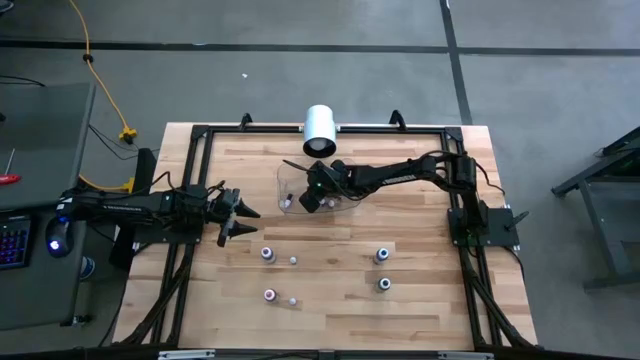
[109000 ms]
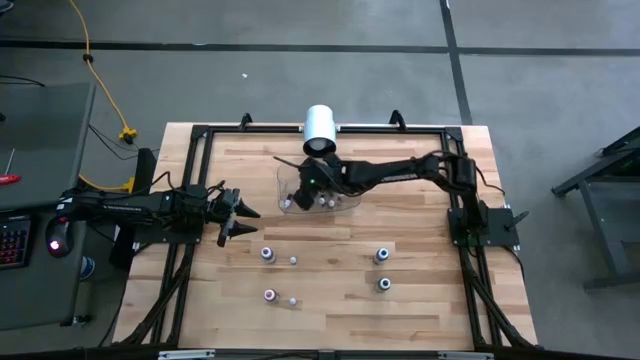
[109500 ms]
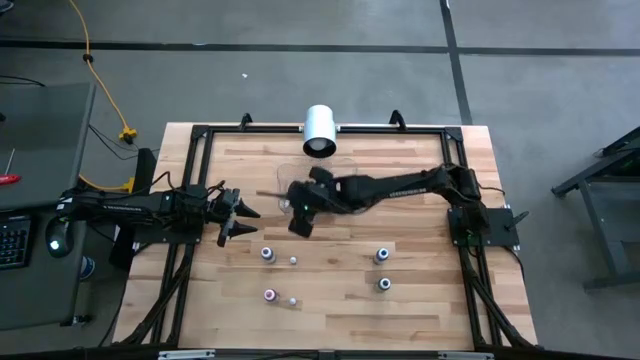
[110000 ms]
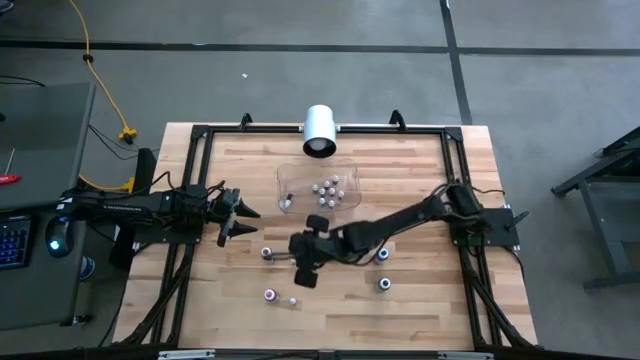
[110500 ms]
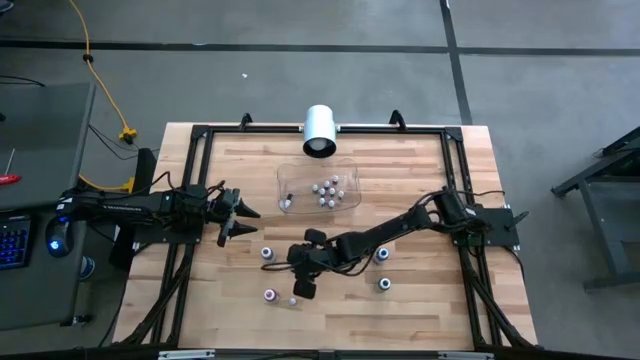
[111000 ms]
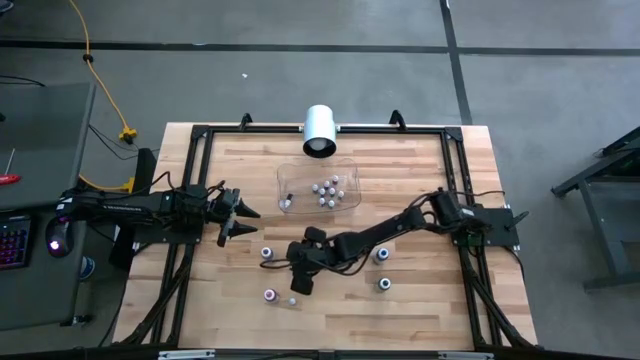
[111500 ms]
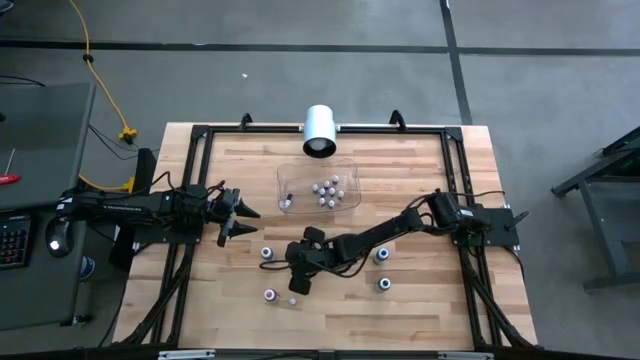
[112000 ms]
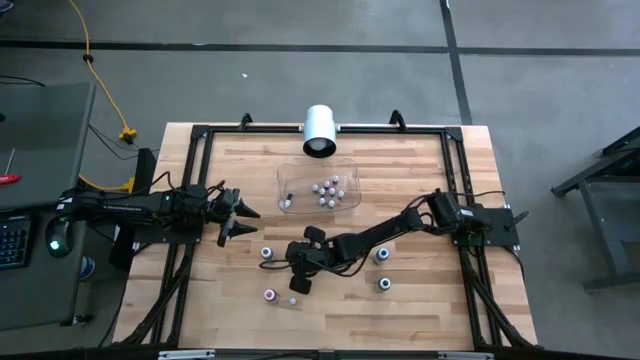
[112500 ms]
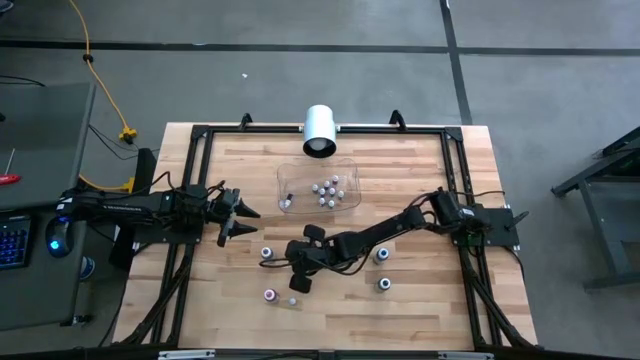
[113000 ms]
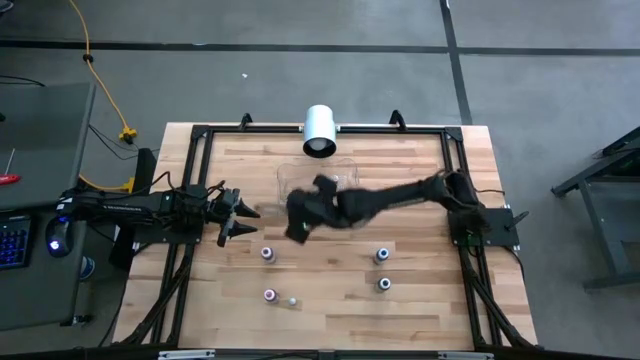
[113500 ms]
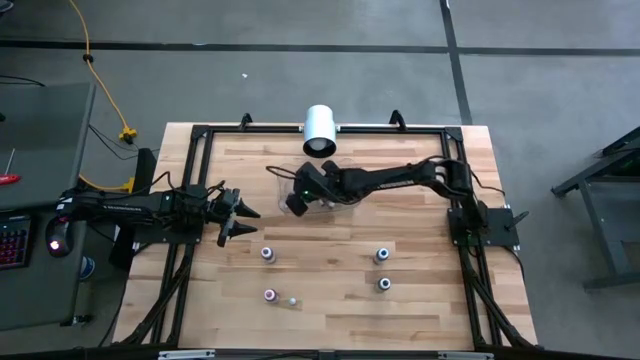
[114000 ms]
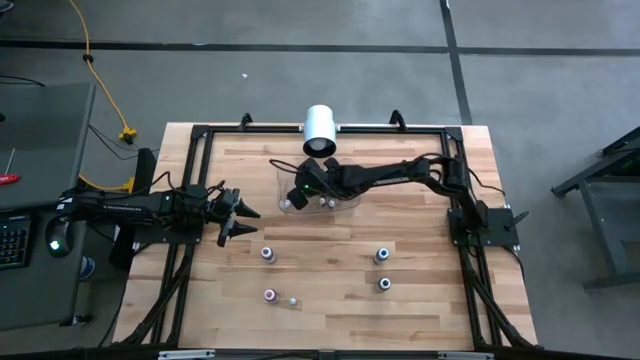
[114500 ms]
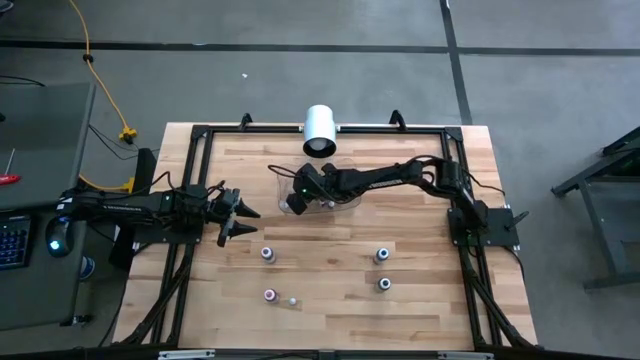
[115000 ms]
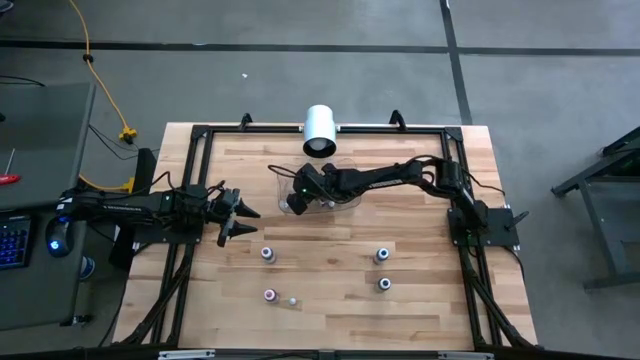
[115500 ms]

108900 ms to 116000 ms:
Task: Pick & Place food coloring
Put the small purple food coloring bottle into the transparent bin

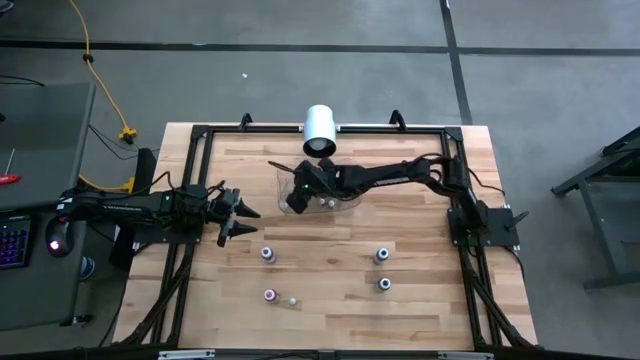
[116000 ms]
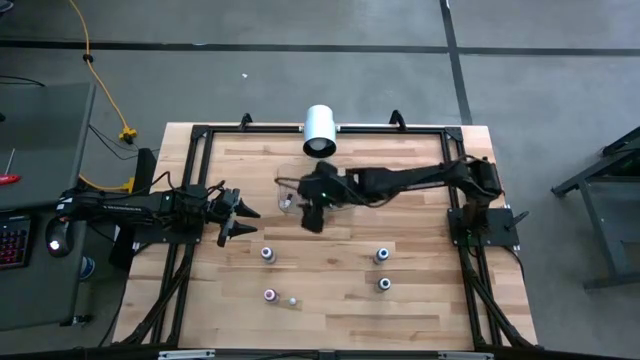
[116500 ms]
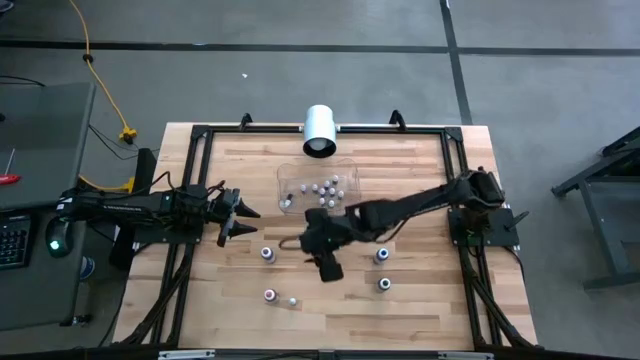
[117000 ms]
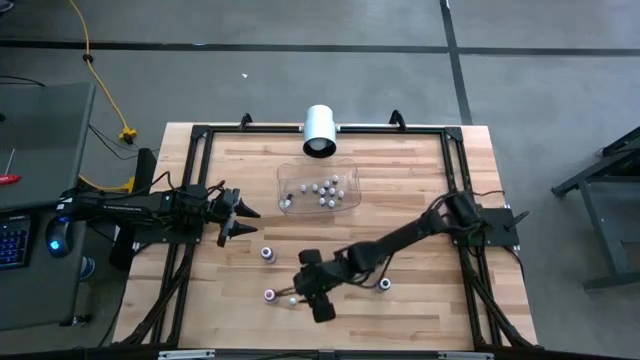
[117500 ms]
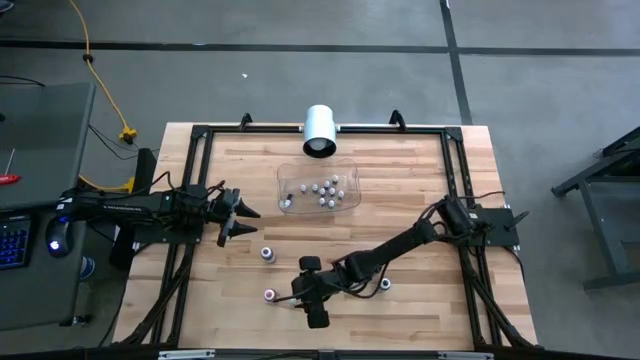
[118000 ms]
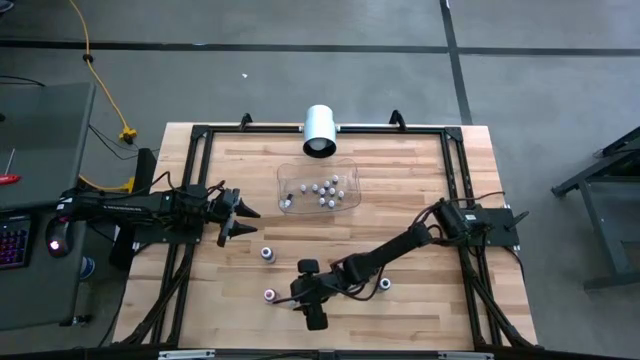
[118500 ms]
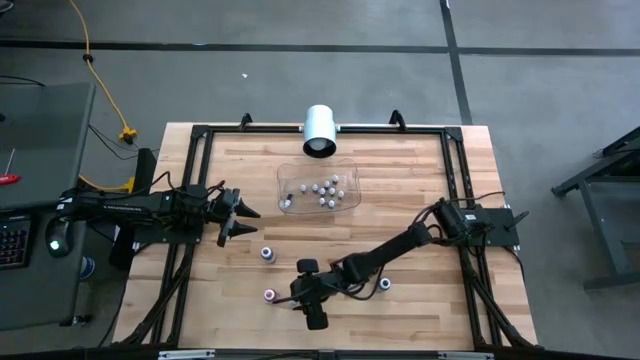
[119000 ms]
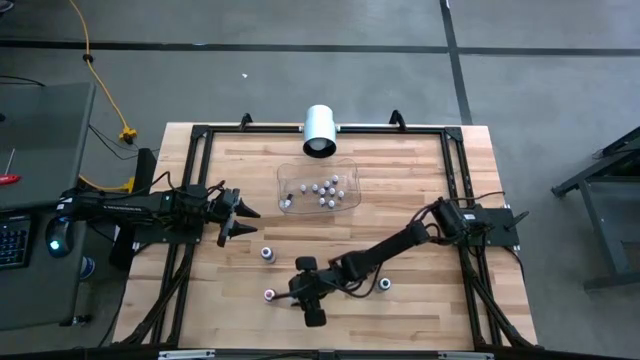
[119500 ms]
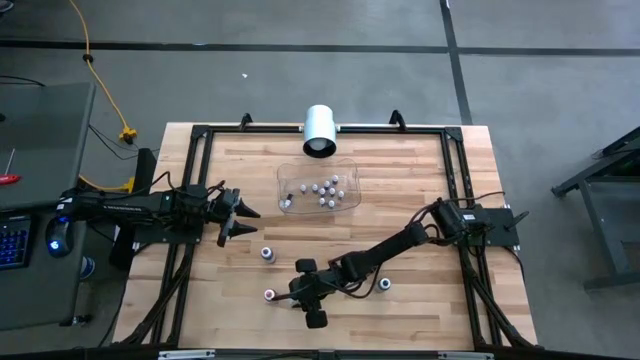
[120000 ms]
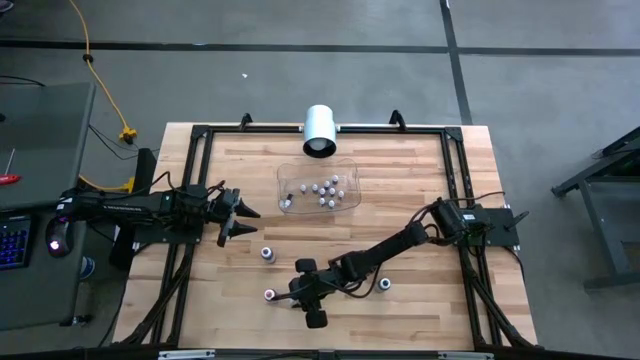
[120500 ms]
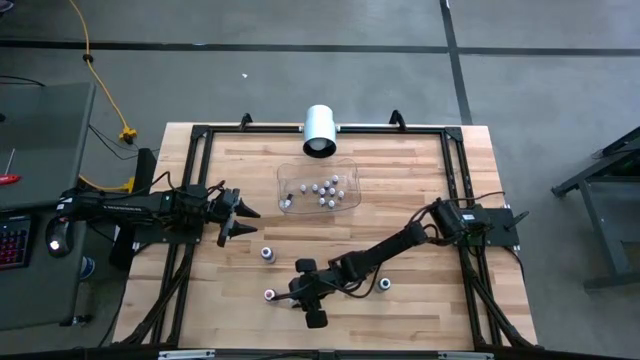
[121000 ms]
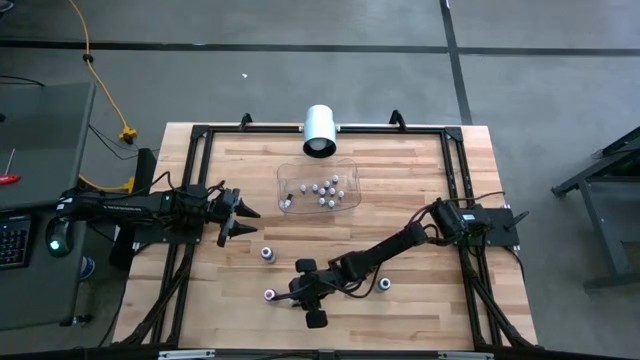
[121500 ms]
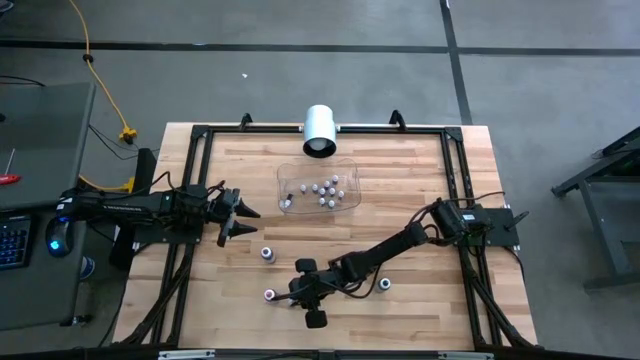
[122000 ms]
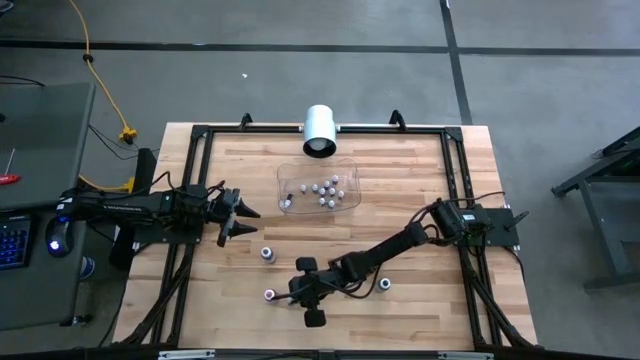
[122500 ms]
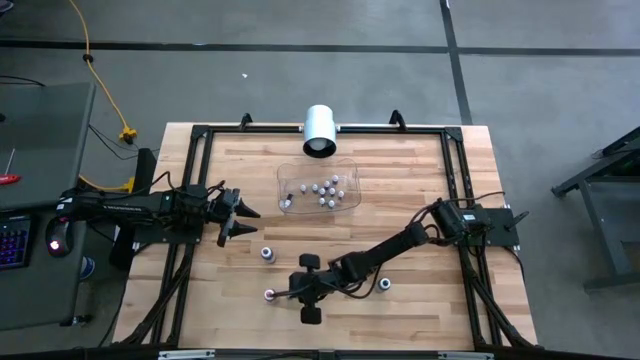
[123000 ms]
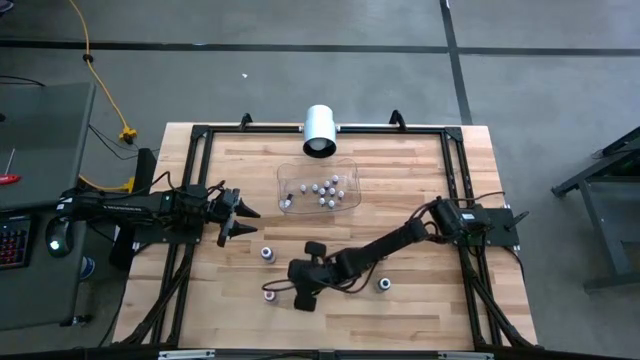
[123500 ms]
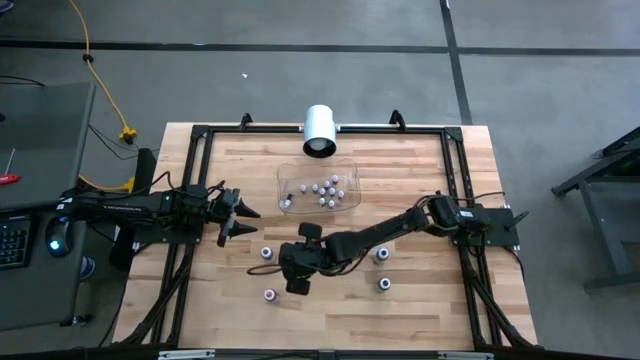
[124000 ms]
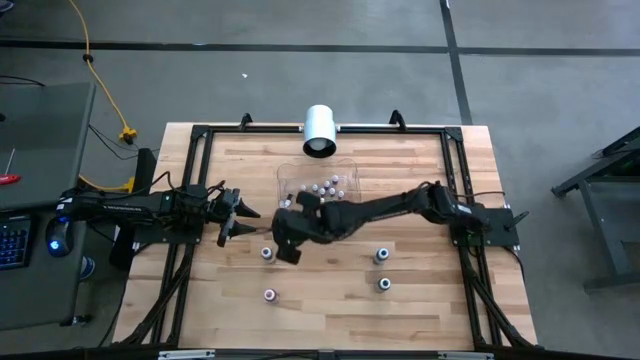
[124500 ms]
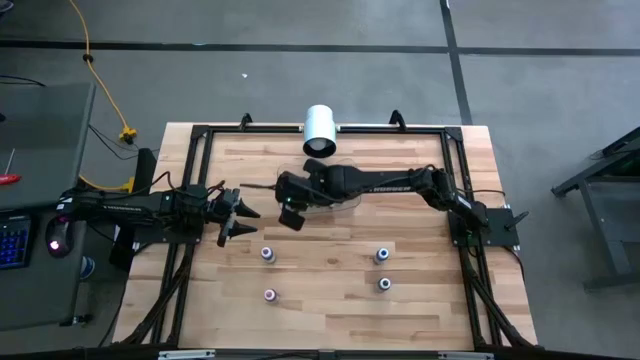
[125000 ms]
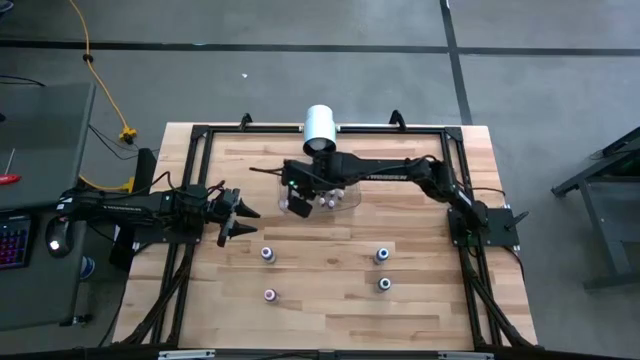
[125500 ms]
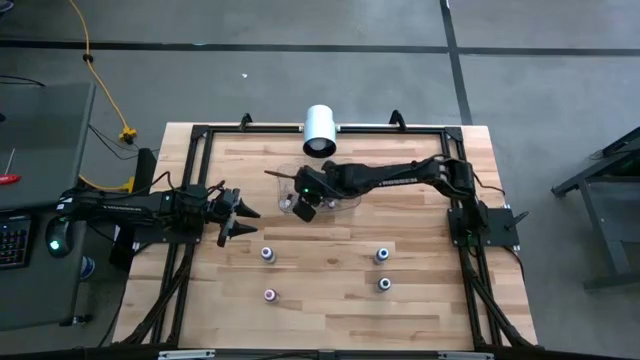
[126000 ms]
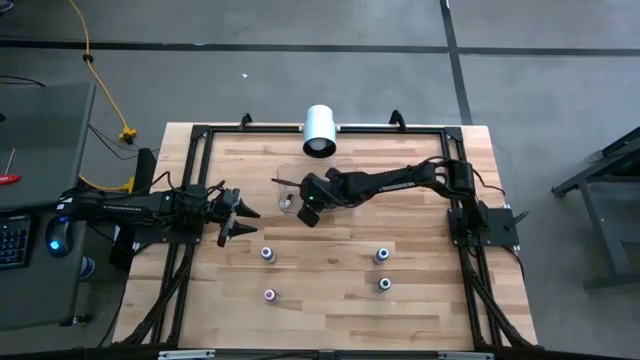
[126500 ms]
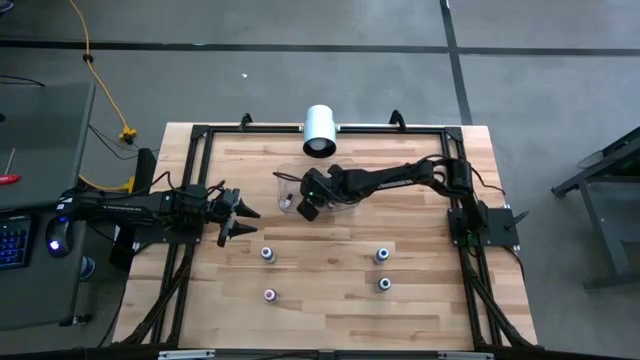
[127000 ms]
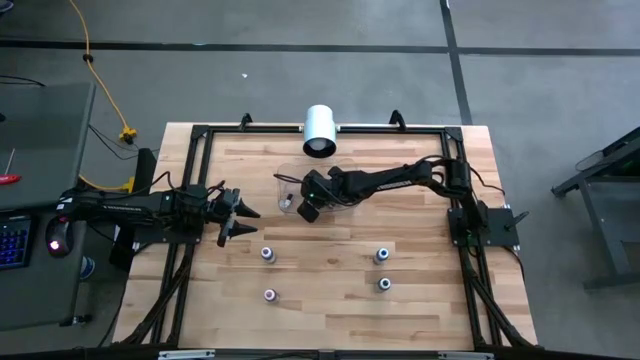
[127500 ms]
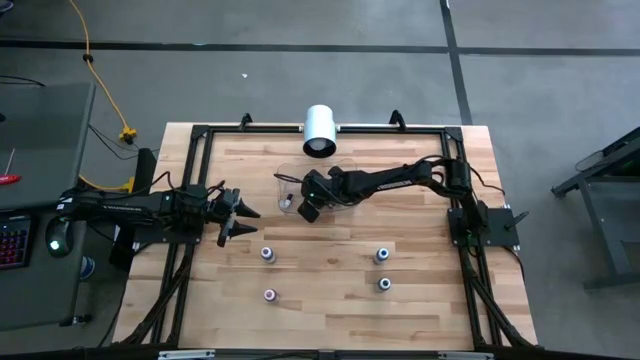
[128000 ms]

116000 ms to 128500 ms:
Put the small blue food coloring bottle into the transparent bin

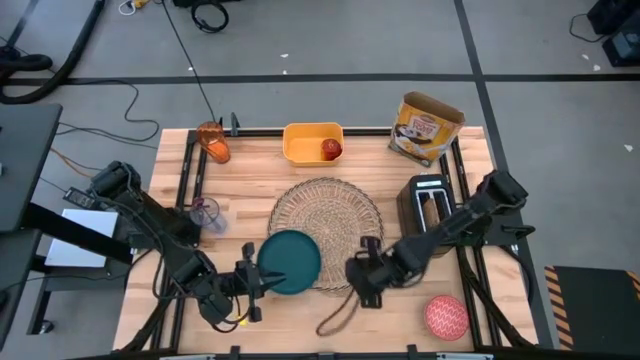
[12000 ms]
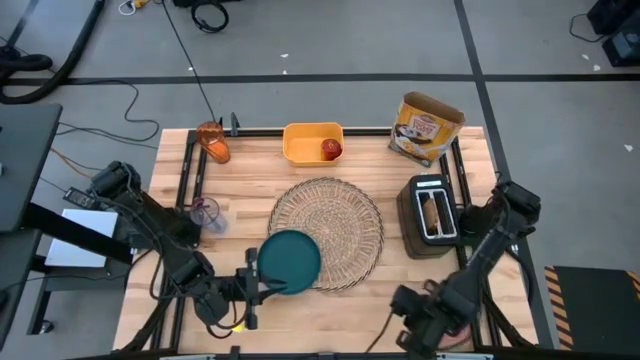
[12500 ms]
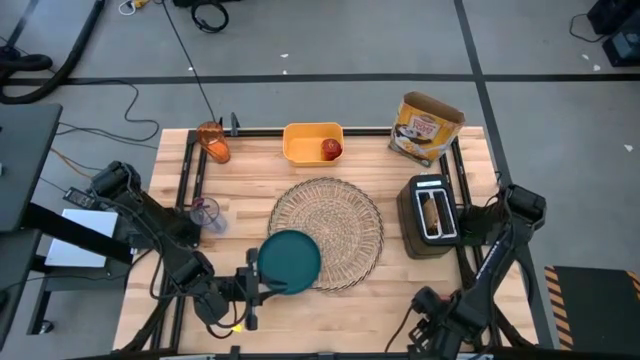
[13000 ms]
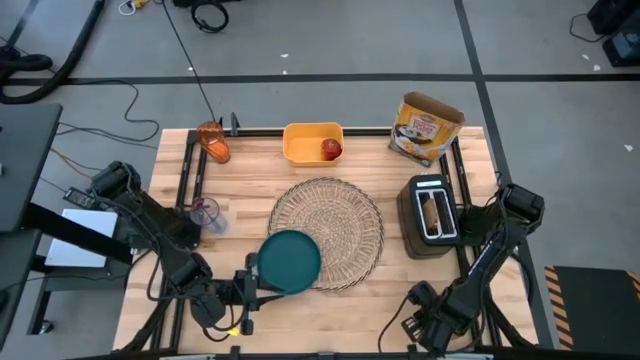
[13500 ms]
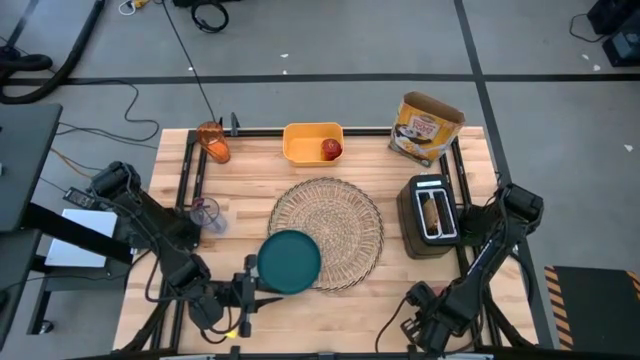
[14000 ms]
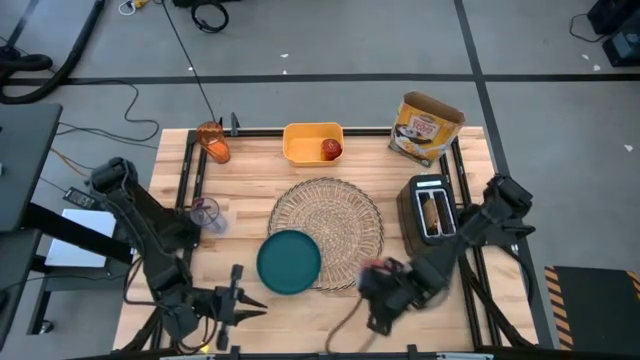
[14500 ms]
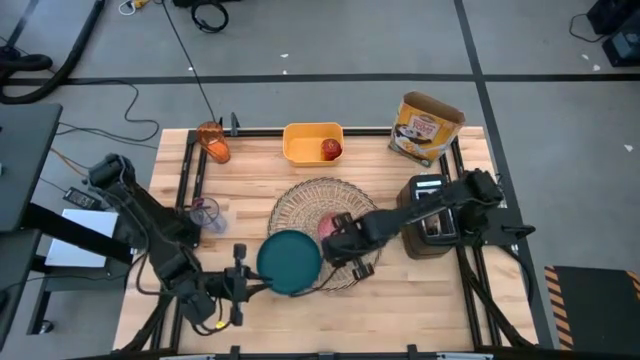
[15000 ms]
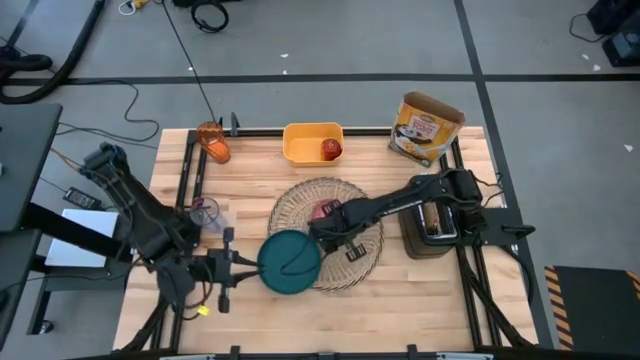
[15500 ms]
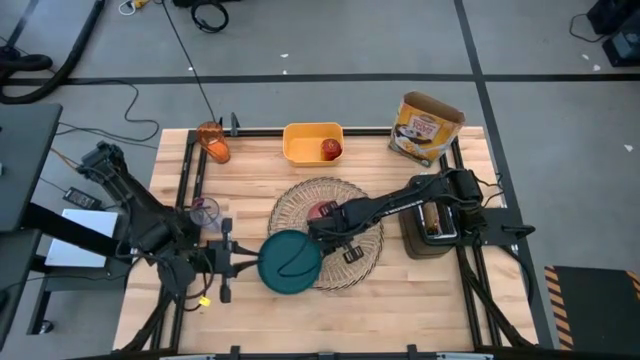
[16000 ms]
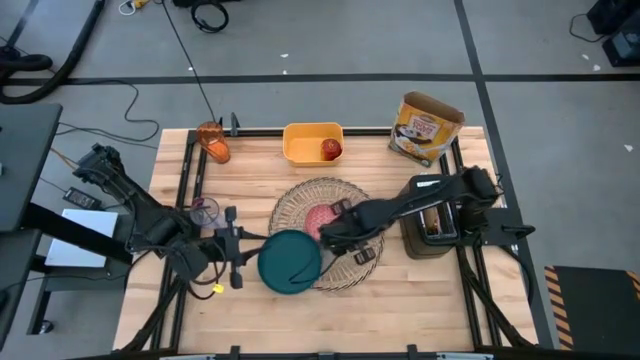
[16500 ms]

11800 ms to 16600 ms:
Task: Arrange a breakfast setting
Put the red bowl in the center of the brown table mat
